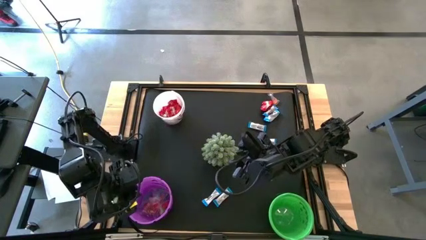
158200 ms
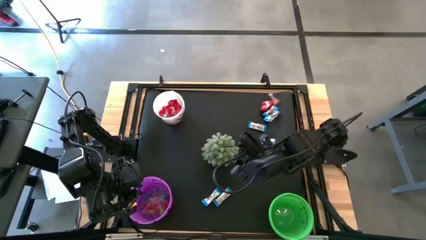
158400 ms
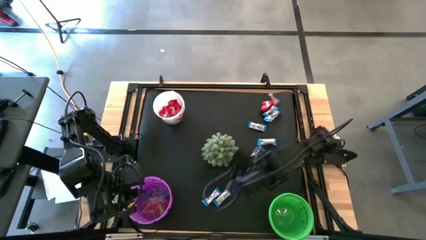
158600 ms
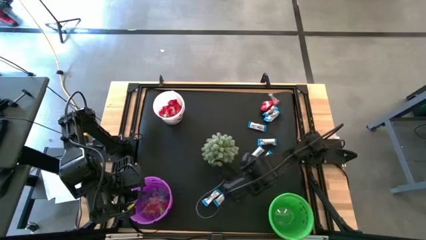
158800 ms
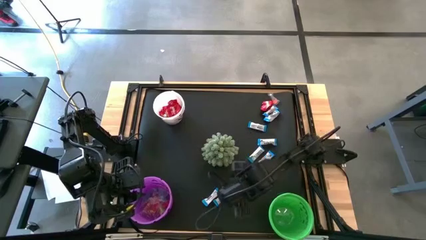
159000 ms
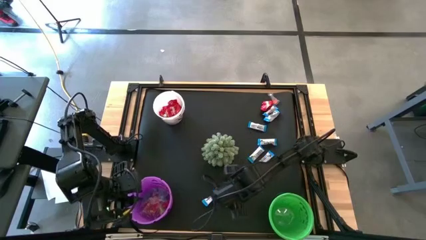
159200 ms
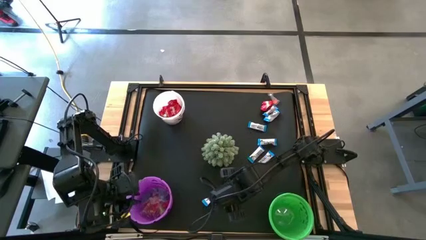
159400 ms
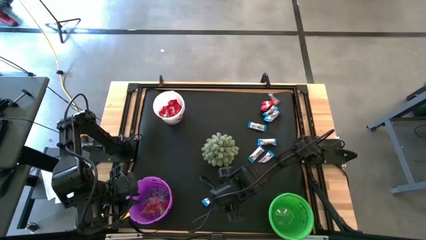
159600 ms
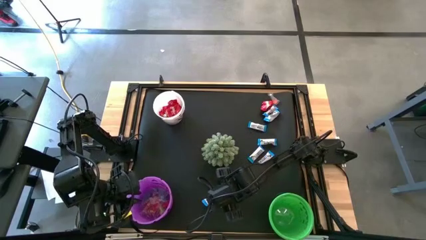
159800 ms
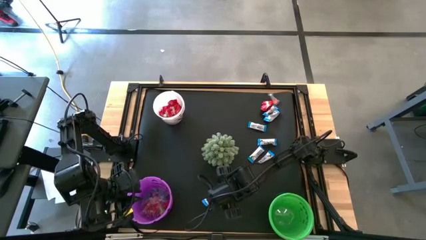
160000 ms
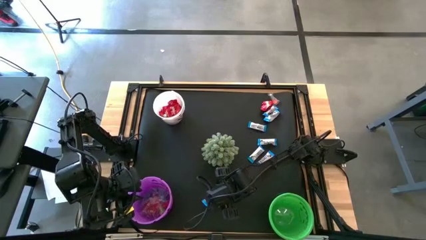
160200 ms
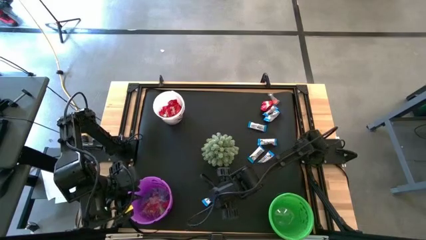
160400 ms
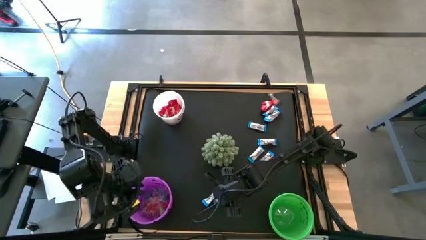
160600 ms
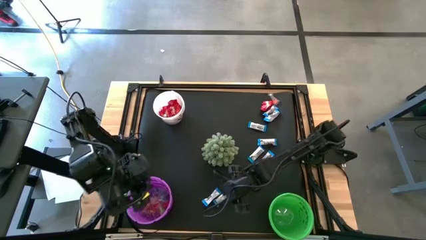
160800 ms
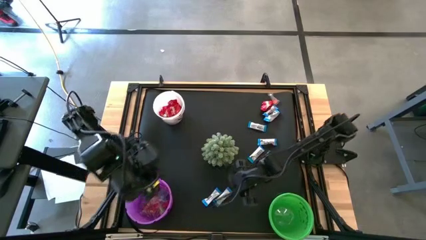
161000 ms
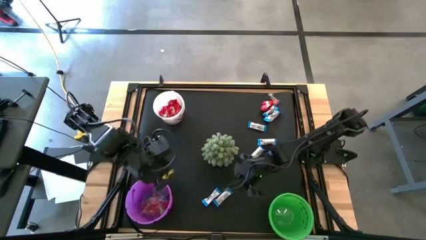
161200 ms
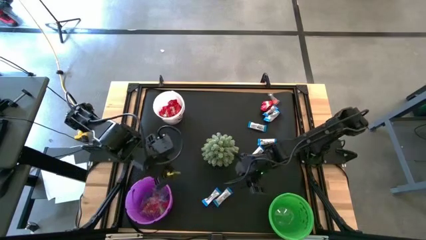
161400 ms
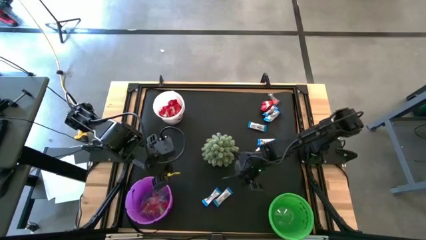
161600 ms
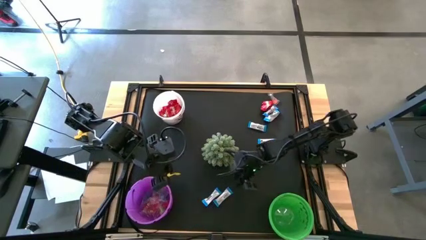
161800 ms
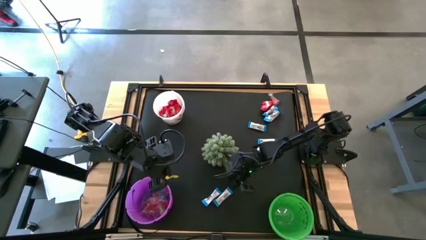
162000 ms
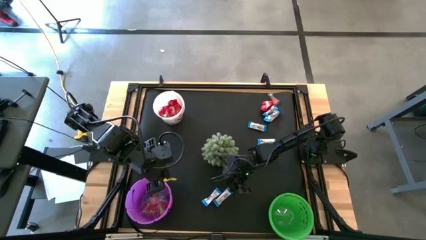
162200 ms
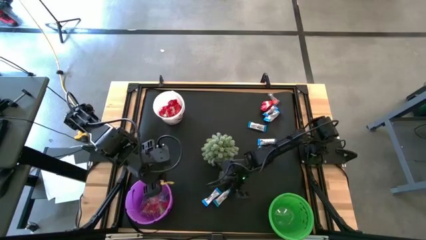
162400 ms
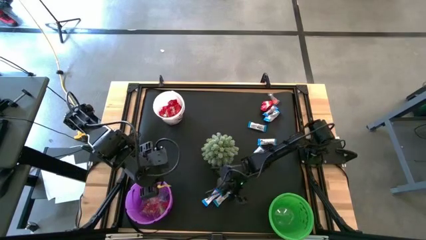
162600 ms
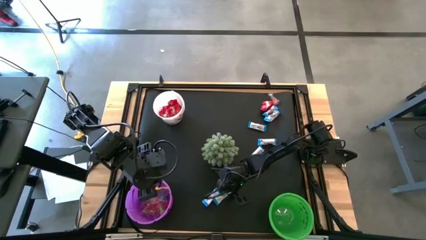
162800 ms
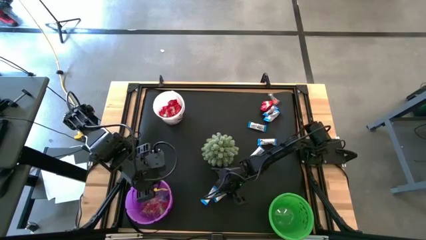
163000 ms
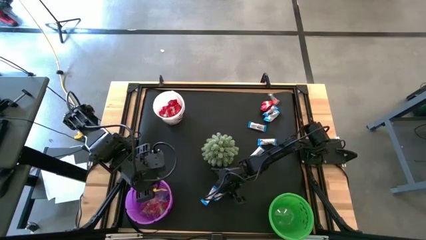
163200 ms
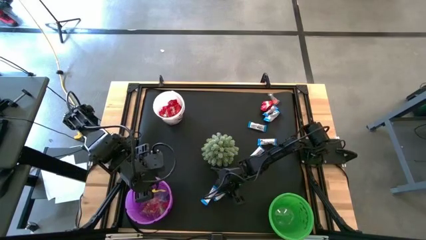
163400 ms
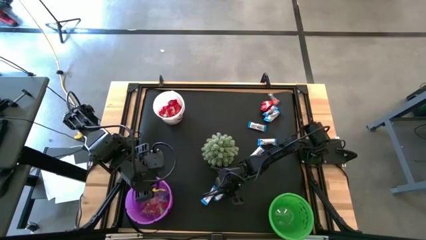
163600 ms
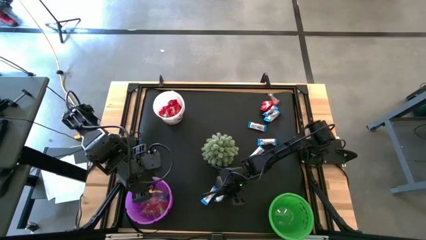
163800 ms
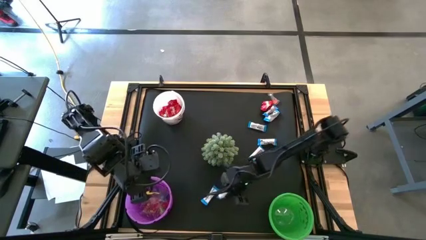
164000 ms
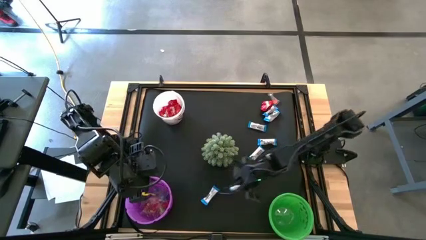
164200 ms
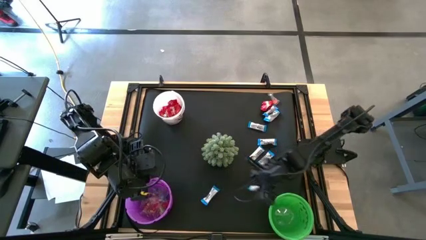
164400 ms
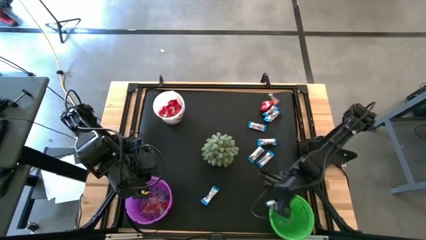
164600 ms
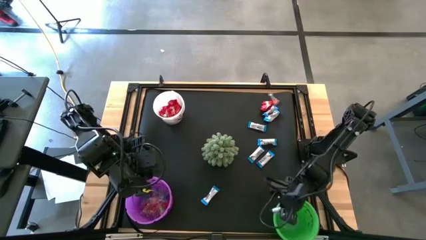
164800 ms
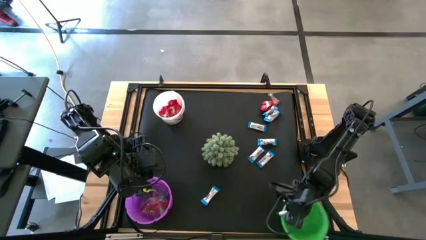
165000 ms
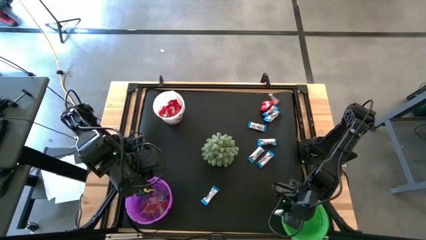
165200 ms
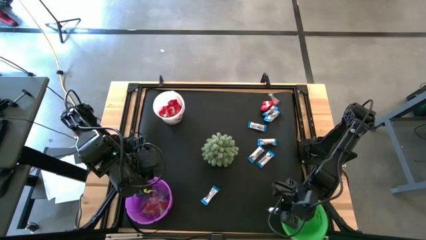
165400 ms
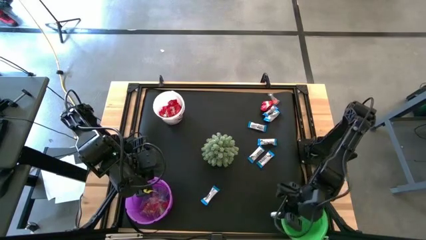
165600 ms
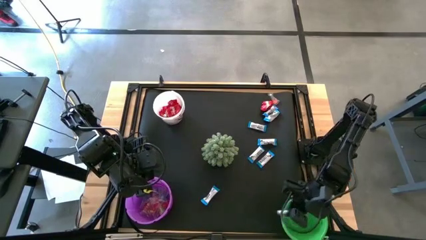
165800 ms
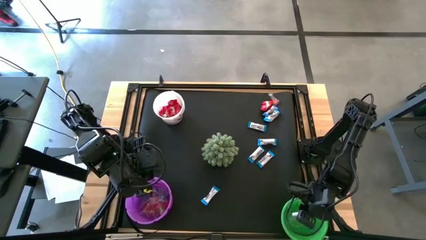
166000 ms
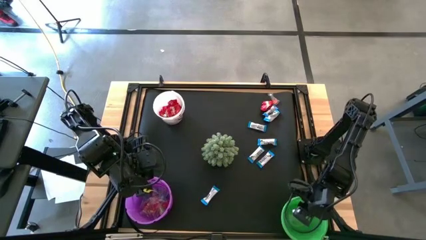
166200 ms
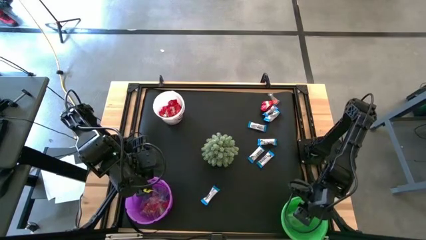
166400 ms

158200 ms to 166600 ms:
Task: Organize candy in baskets
Put the white chocolate bar into the green bucket

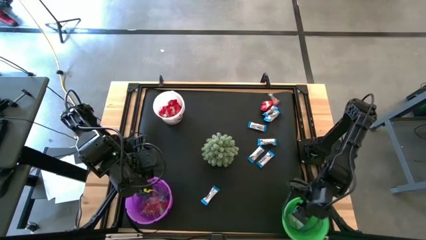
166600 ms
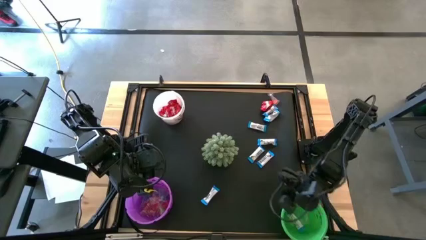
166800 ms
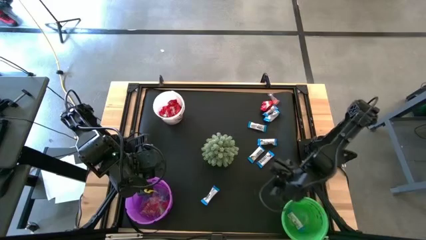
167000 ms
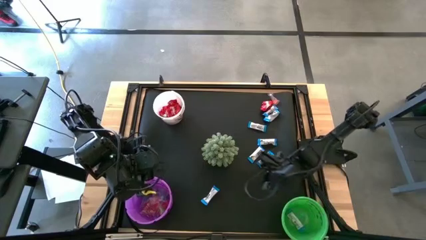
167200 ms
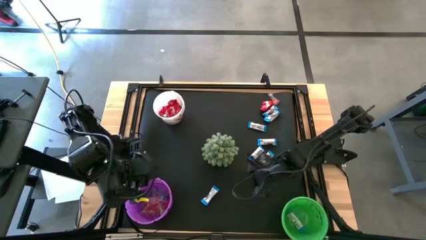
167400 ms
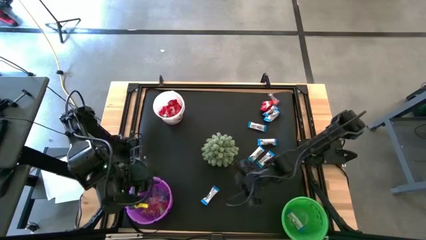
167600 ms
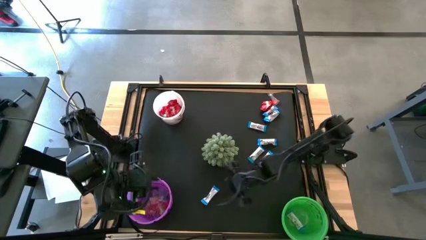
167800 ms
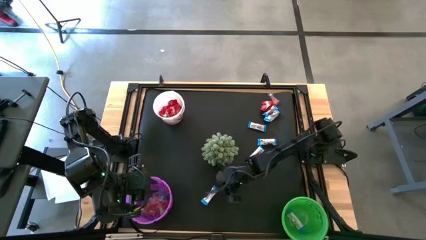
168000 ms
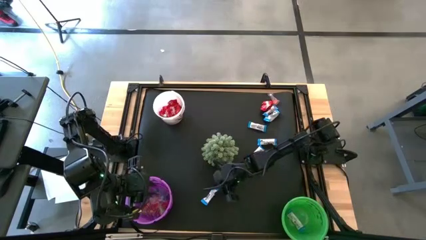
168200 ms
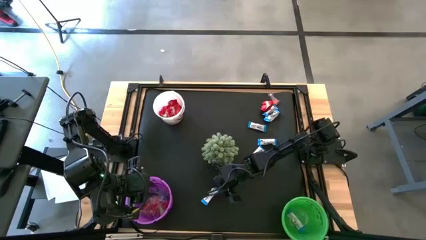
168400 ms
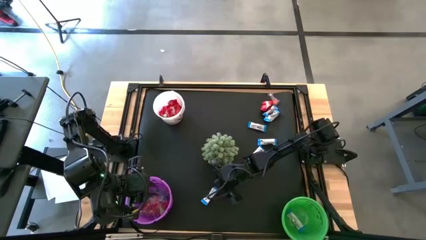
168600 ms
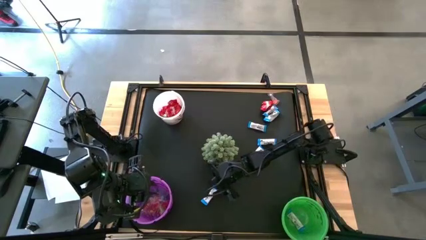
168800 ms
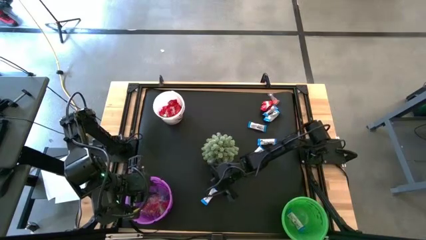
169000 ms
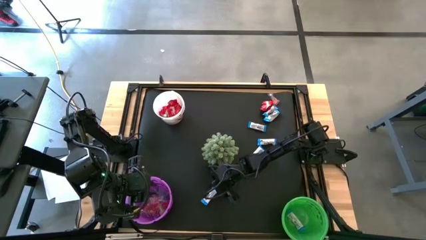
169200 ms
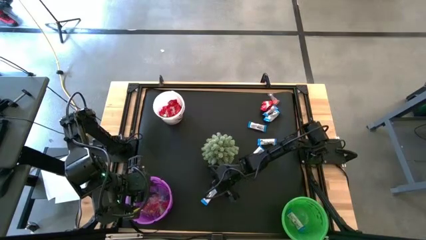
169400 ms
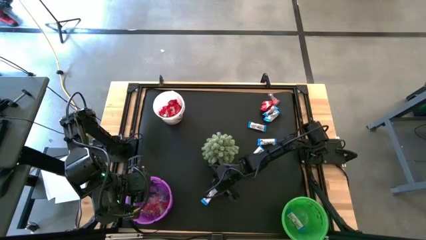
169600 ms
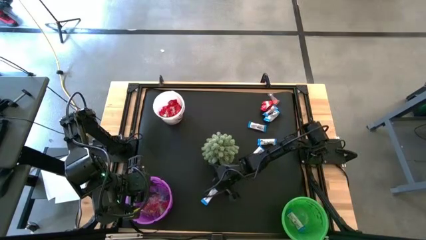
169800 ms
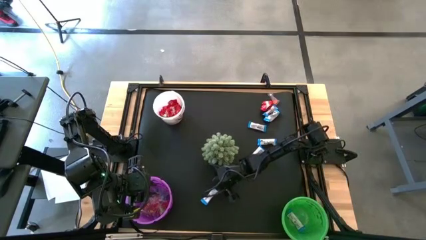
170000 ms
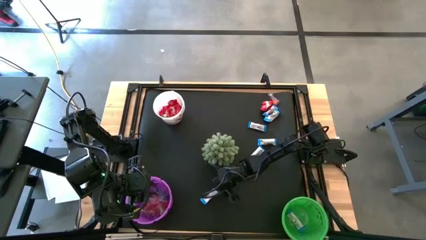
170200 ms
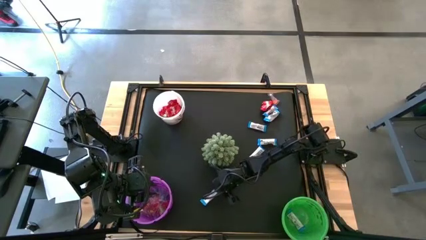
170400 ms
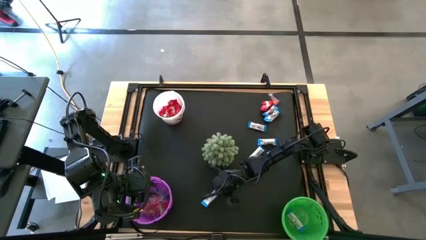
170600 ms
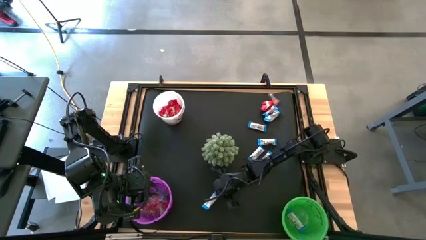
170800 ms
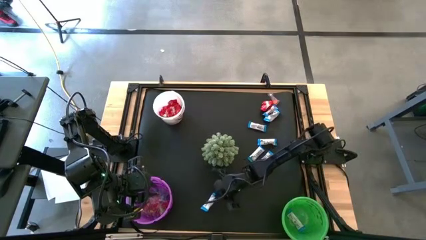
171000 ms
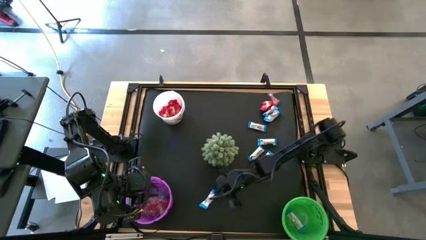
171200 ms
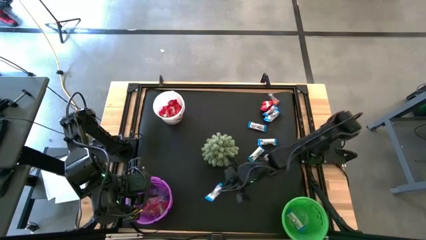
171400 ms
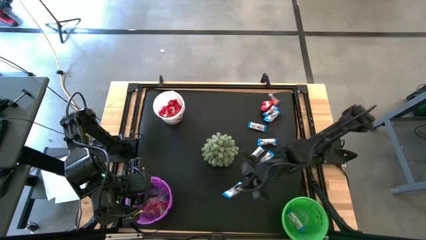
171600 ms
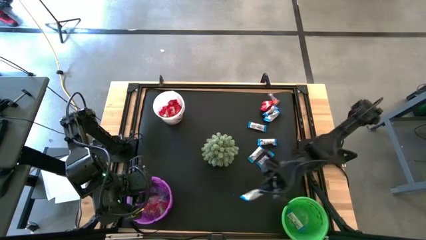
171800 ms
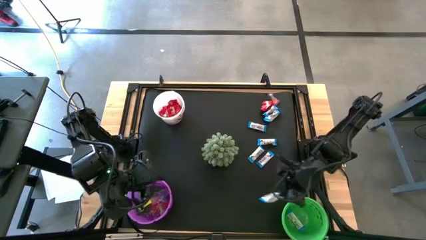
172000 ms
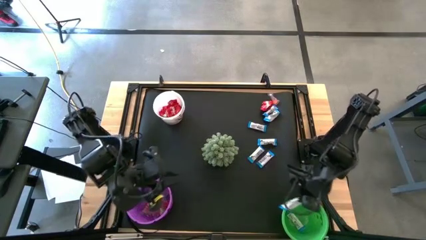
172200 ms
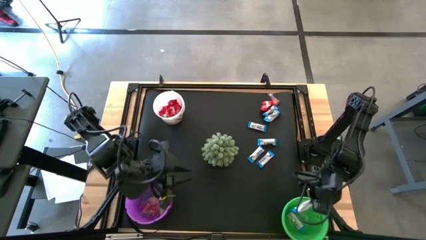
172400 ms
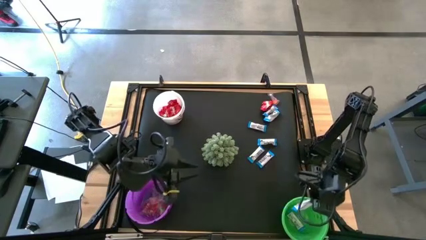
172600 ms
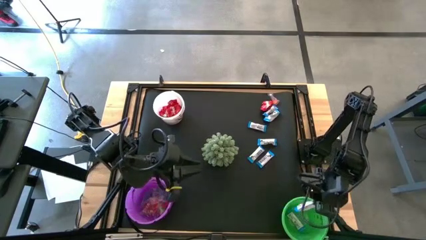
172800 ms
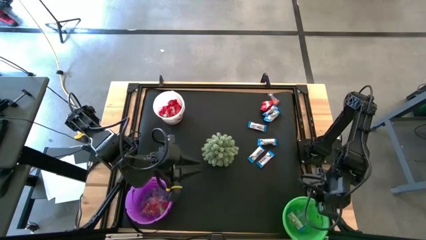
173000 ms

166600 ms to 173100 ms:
Put the white chocolate bar into the green bucket
